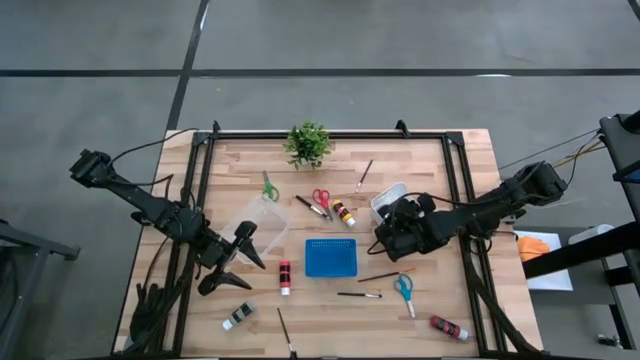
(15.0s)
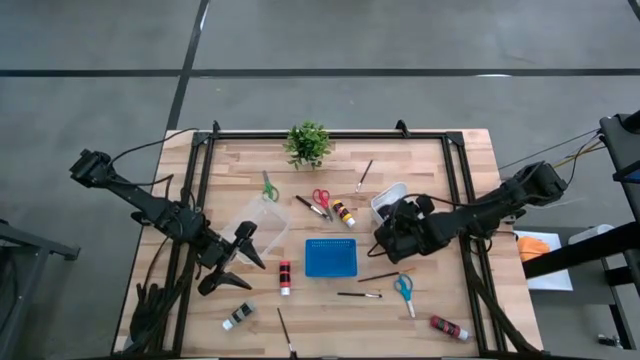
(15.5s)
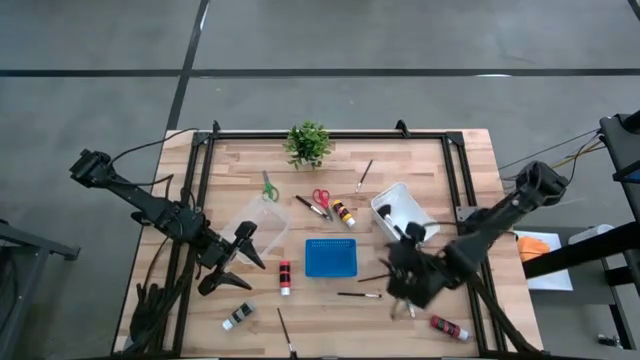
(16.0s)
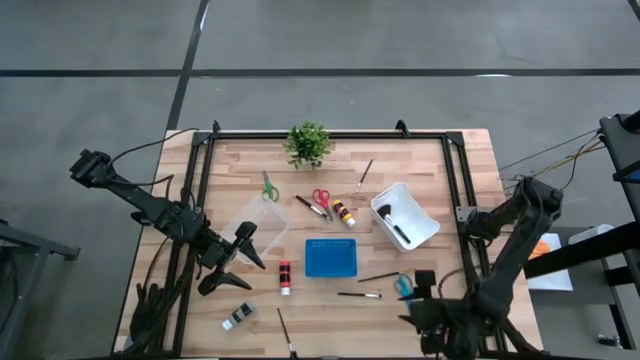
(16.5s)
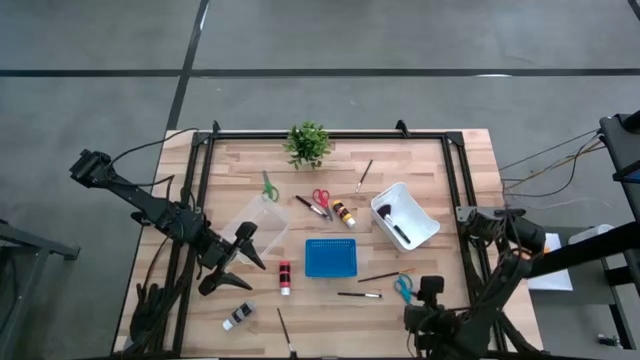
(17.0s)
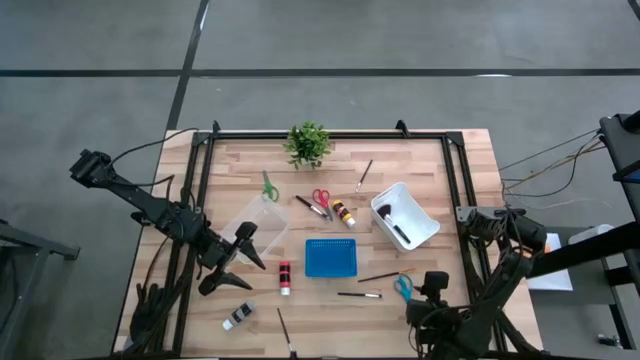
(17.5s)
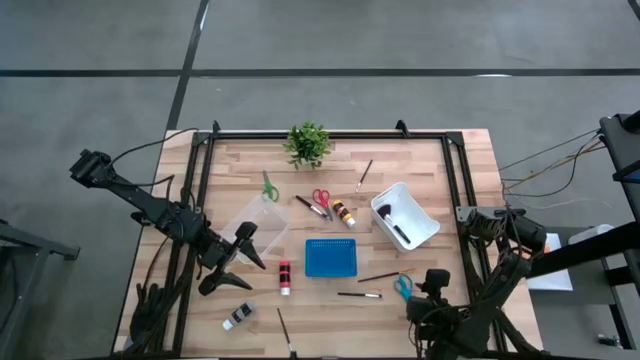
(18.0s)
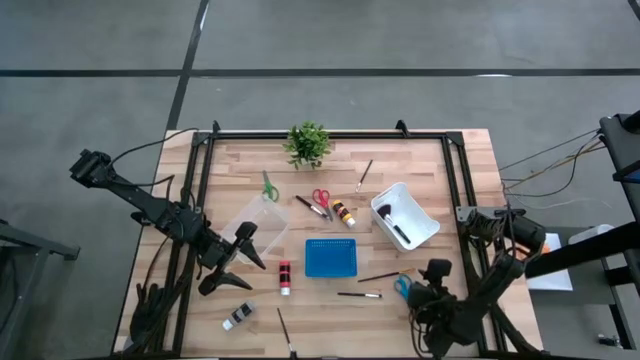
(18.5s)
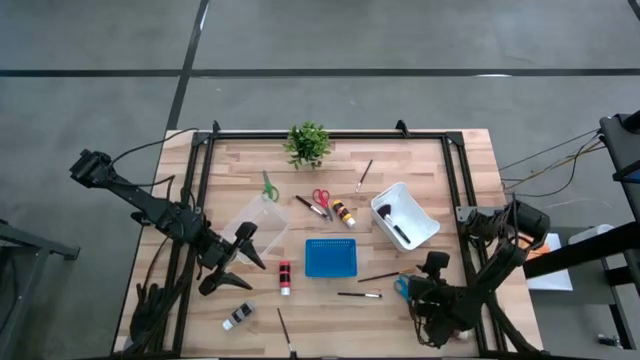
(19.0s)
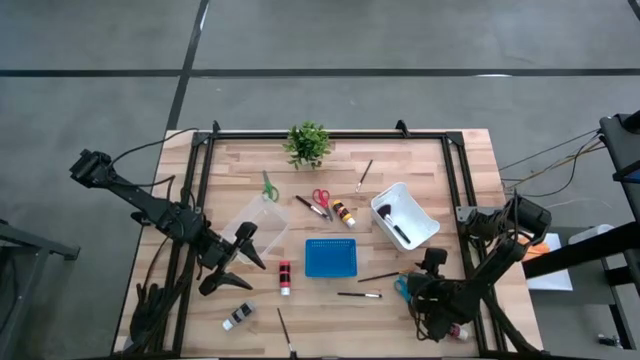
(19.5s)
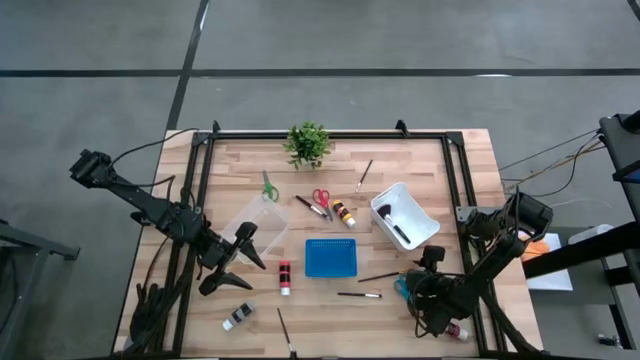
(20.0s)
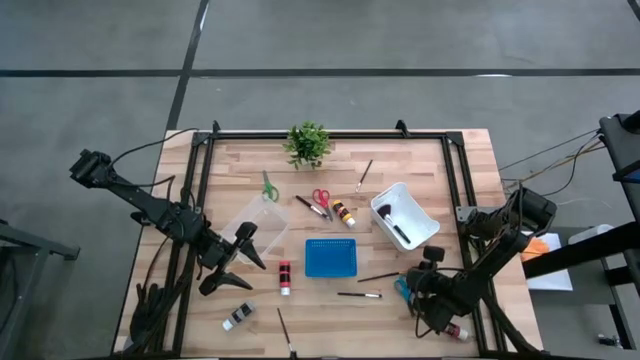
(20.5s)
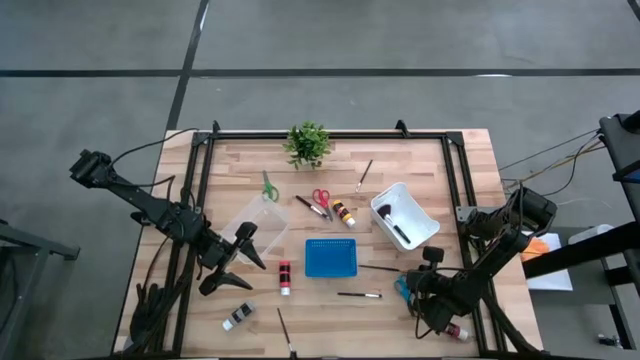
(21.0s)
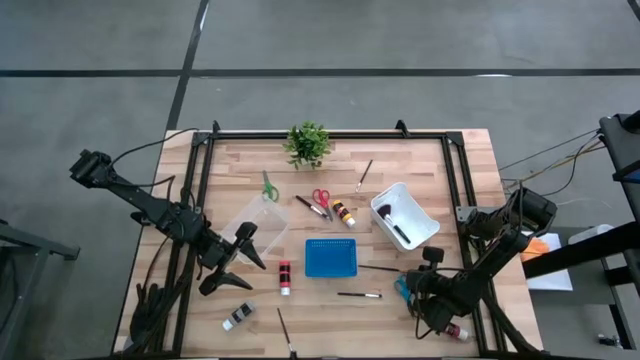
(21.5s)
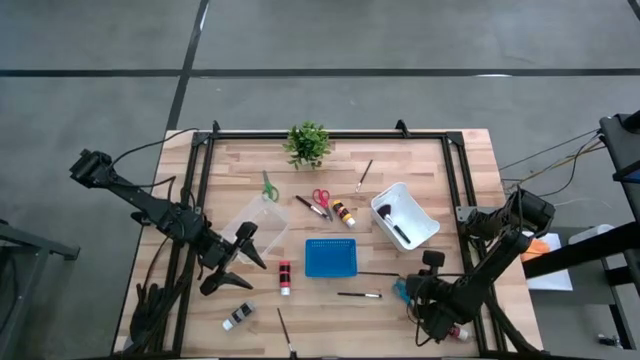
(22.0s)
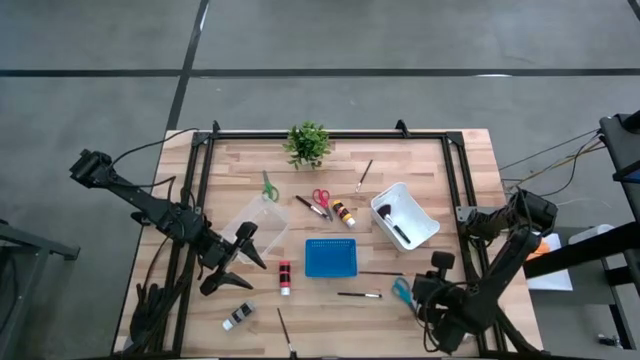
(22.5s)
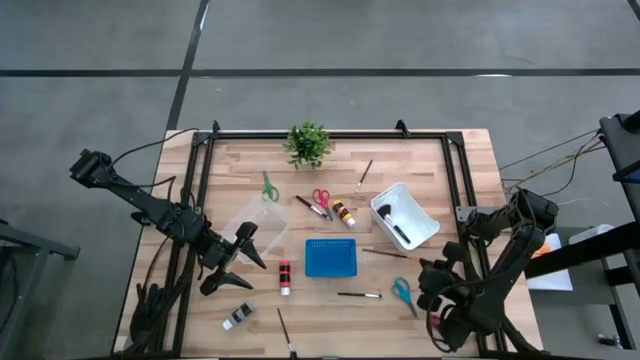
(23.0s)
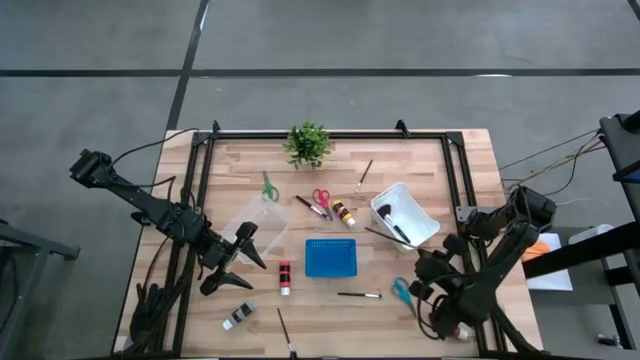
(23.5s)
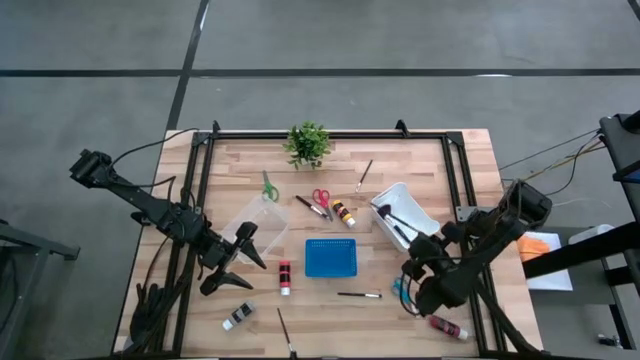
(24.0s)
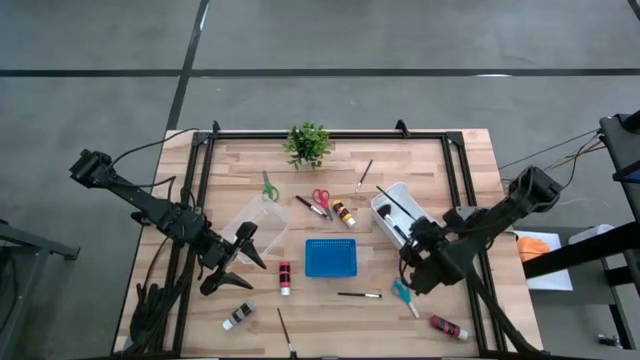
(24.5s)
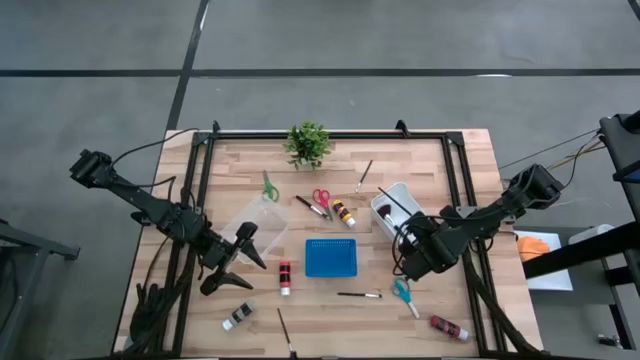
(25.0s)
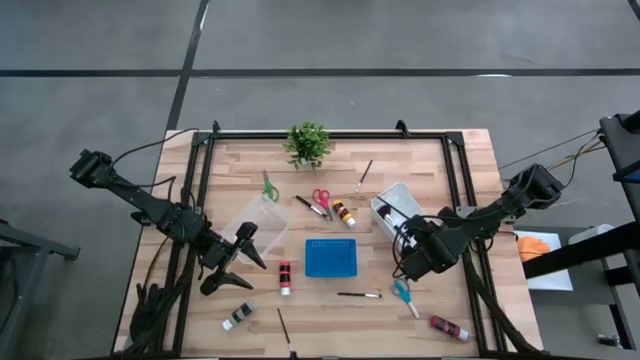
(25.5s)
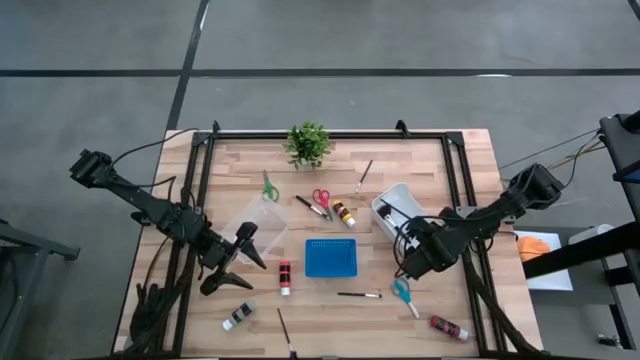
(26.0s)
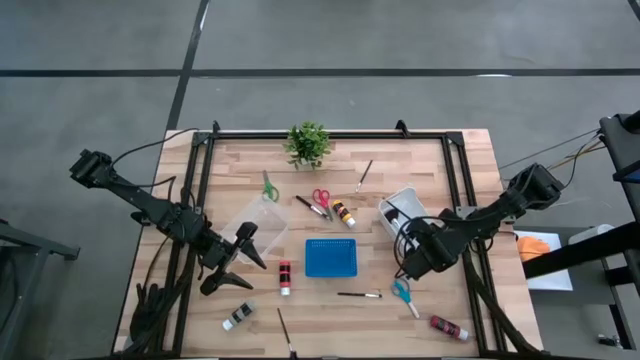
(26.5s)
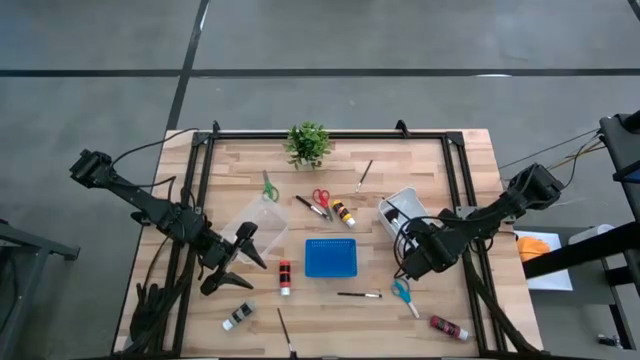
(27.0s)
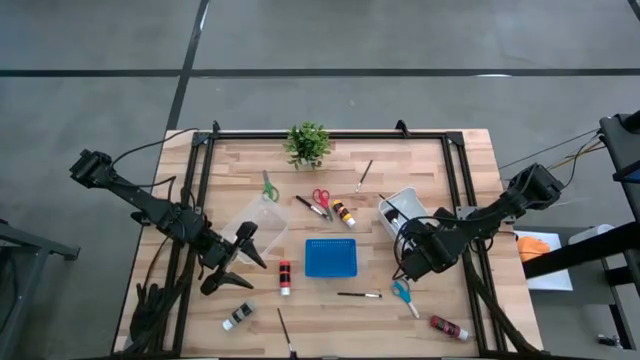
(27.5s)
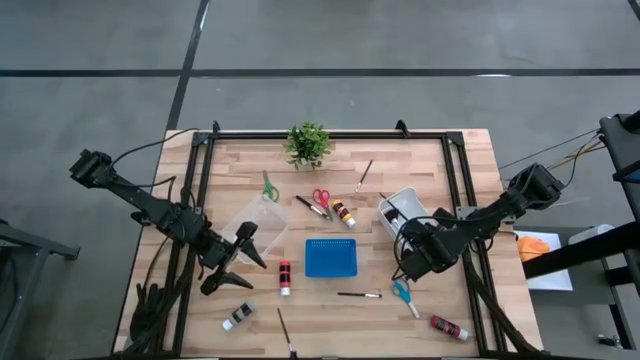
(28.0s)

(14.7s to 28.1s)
Task: Pick & Place Paint Supplies
Put the foundation brush in the white bin

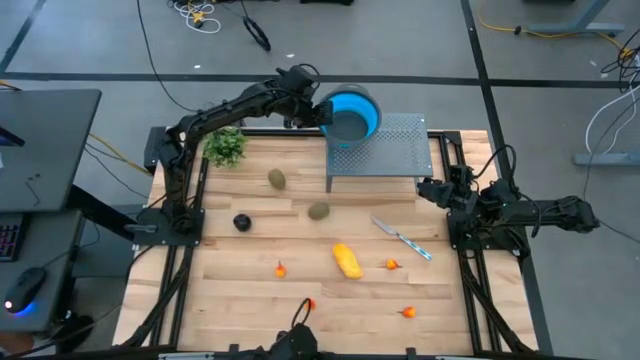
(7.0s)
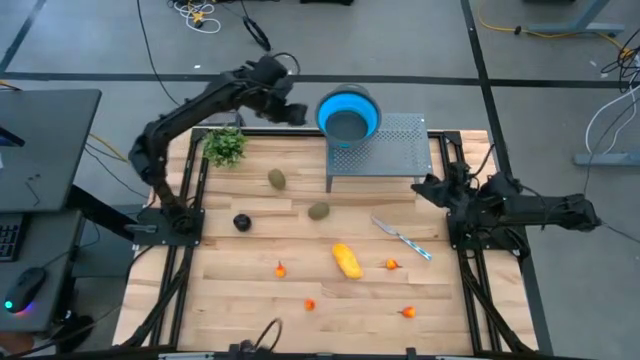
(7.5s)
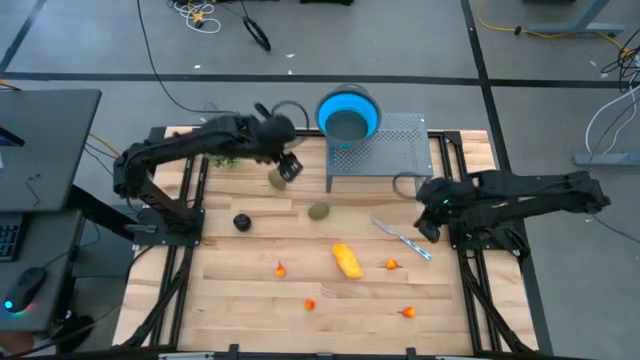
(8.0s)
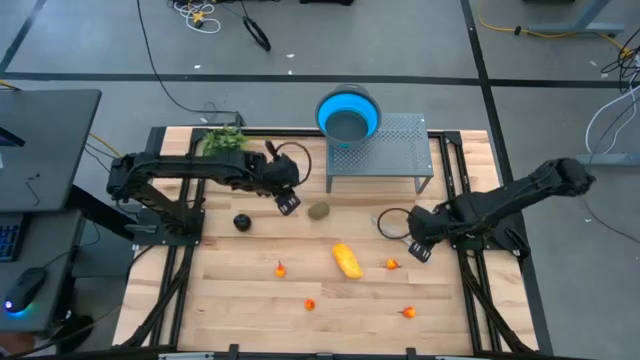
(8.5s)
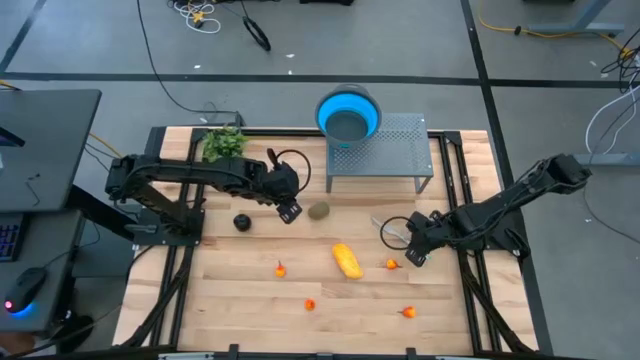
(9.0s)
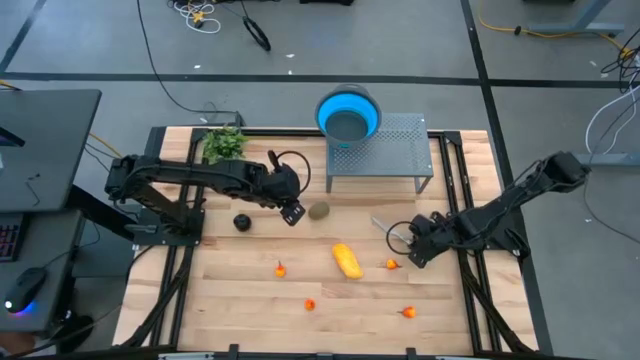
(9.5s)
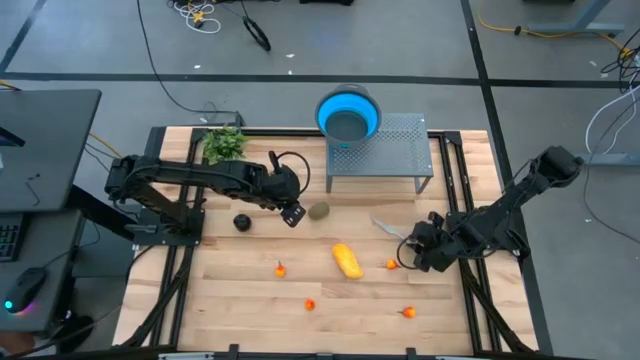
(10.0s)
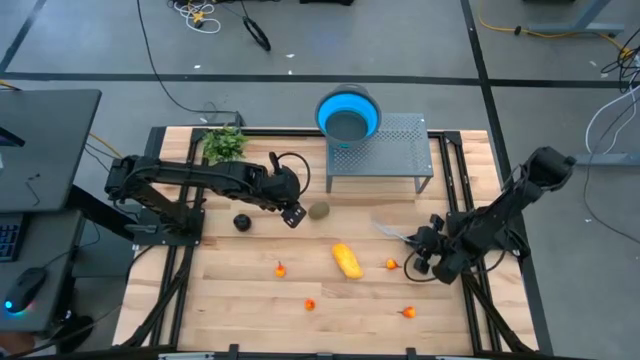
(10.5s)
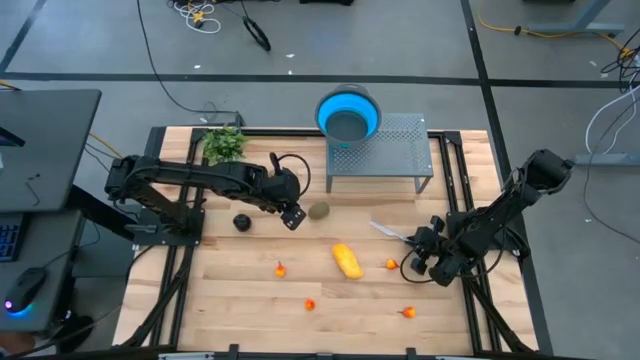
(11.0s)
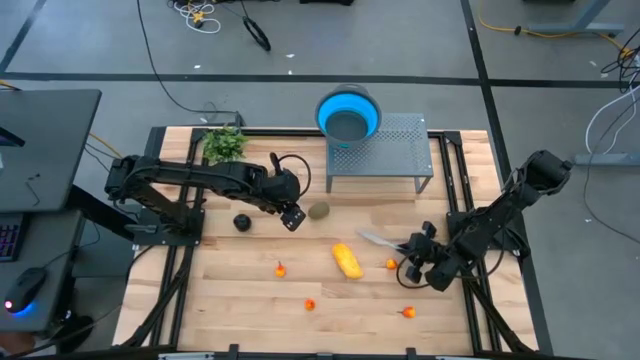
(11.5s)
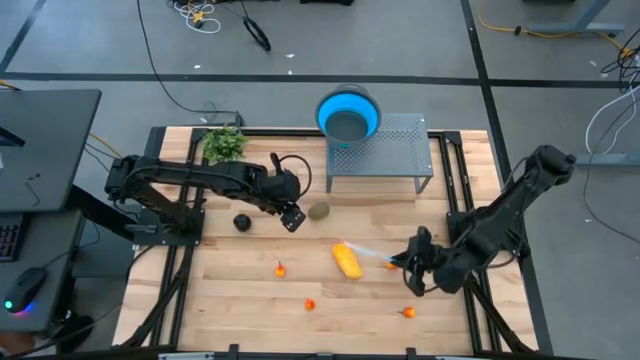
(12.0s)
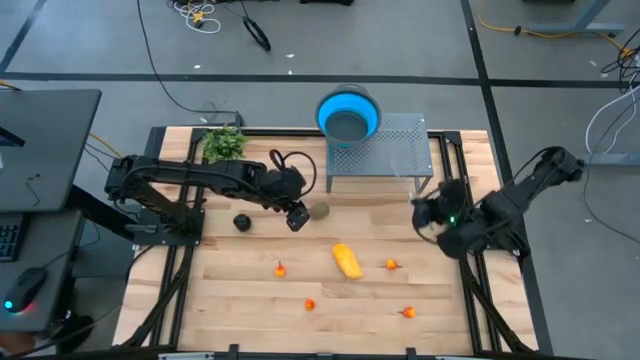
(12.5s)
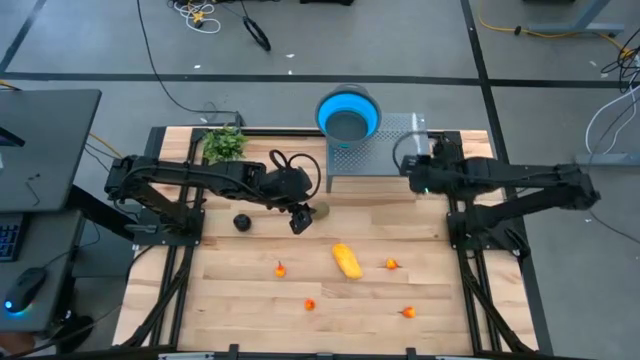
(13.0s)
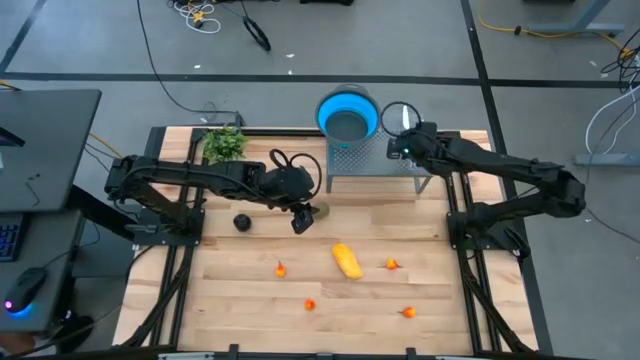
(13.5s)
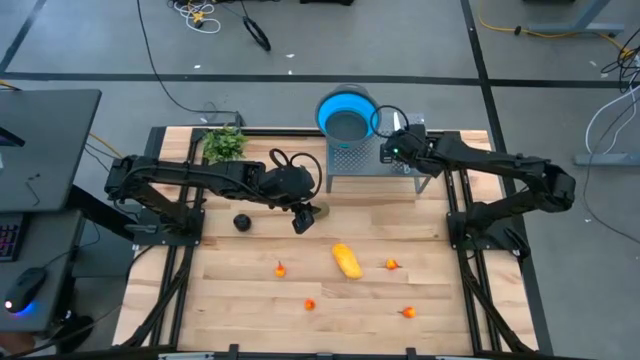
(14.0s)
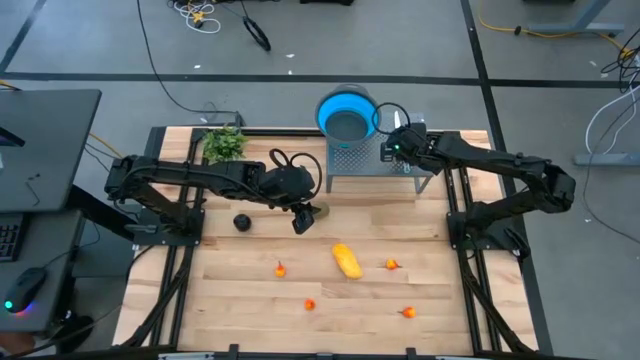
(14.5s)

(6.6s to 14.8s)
Task: Pick & Place Fruit
Put the table knife on the shelf
